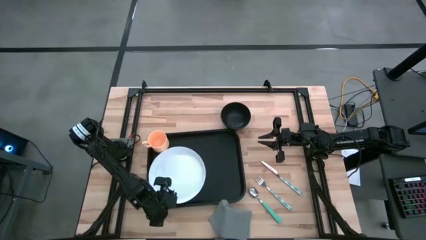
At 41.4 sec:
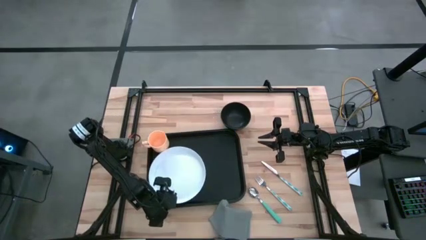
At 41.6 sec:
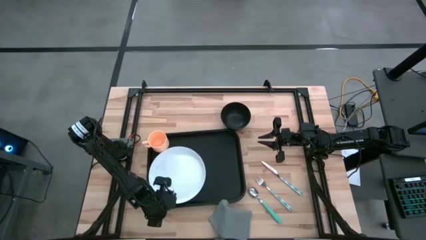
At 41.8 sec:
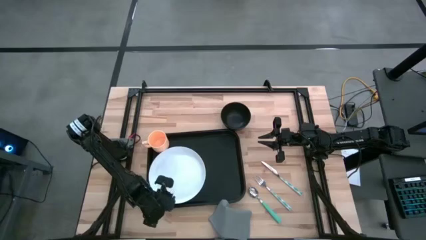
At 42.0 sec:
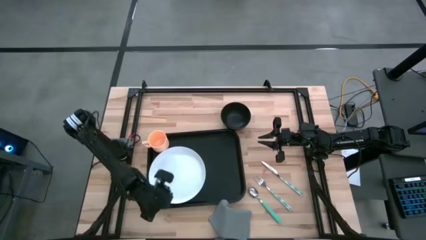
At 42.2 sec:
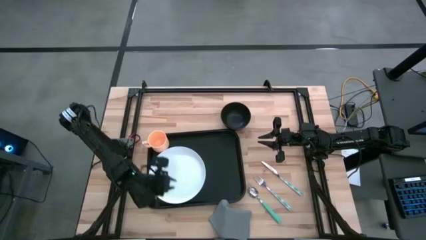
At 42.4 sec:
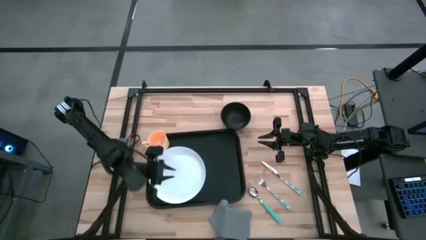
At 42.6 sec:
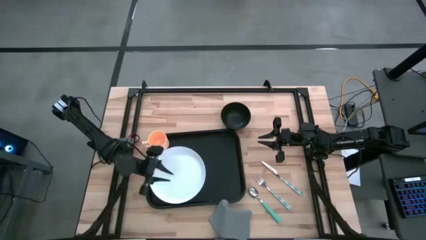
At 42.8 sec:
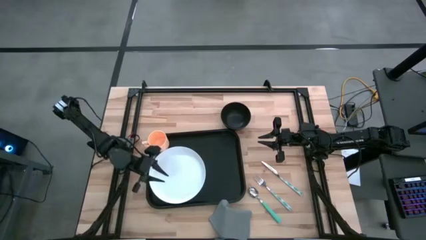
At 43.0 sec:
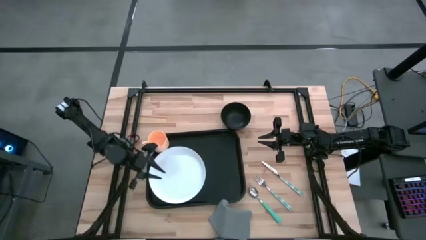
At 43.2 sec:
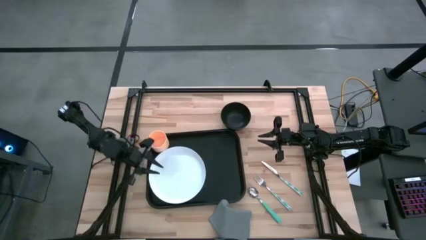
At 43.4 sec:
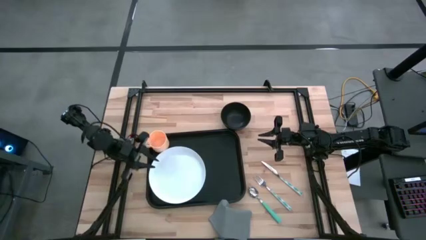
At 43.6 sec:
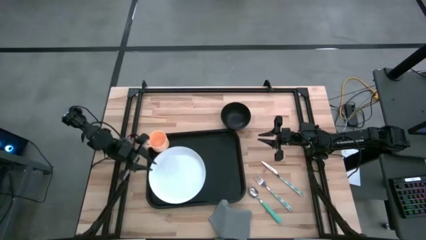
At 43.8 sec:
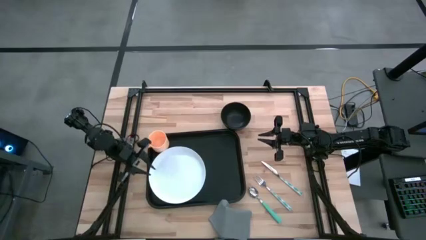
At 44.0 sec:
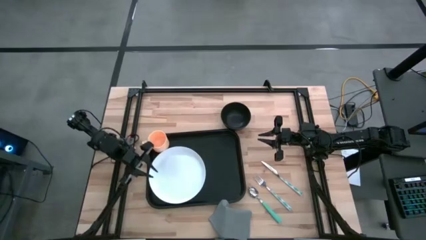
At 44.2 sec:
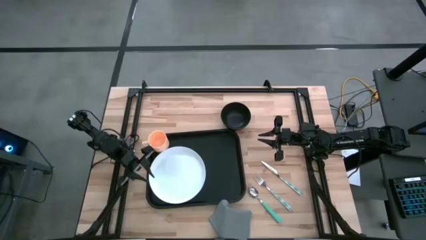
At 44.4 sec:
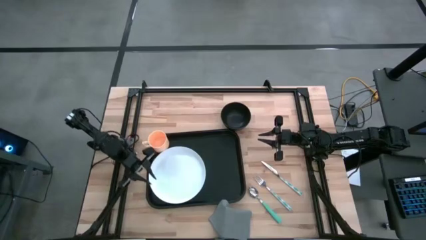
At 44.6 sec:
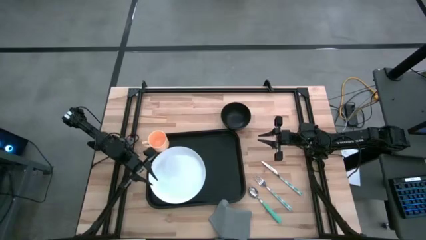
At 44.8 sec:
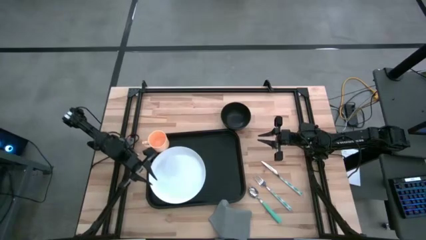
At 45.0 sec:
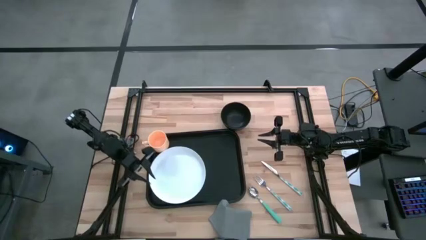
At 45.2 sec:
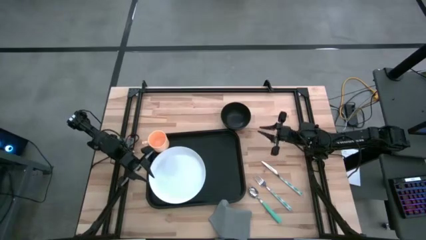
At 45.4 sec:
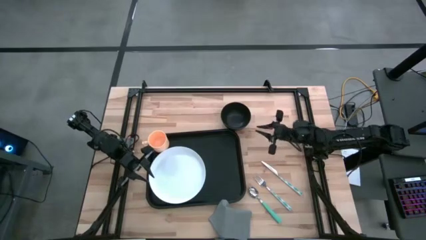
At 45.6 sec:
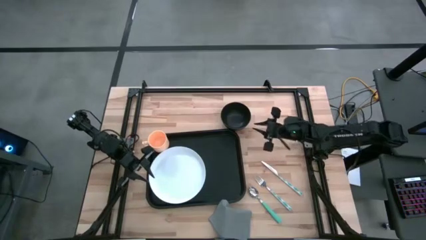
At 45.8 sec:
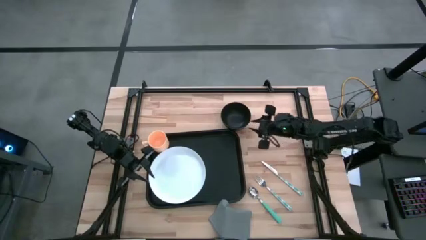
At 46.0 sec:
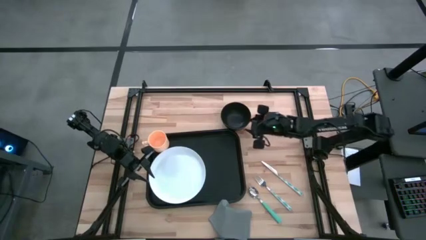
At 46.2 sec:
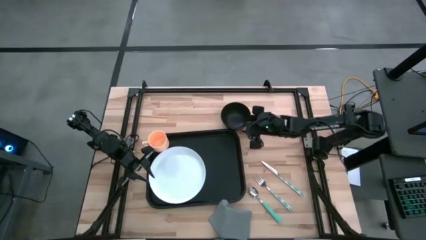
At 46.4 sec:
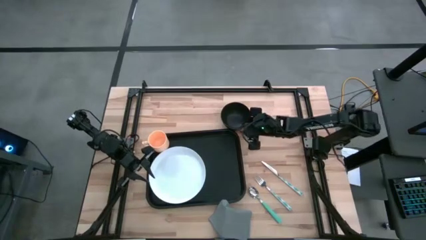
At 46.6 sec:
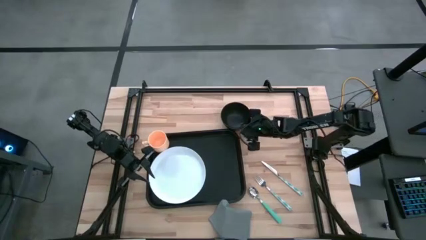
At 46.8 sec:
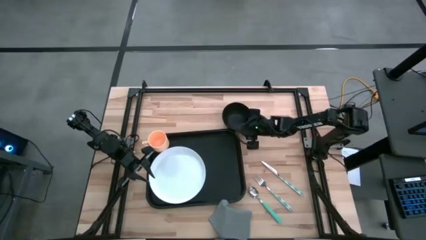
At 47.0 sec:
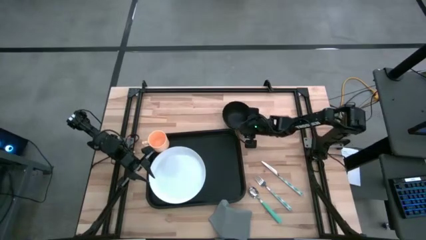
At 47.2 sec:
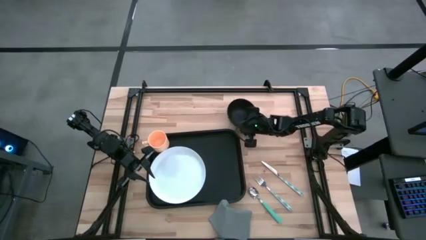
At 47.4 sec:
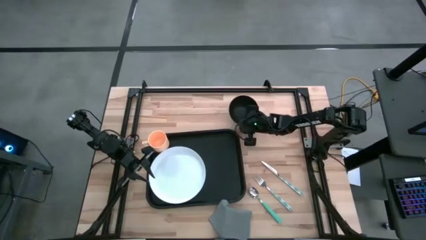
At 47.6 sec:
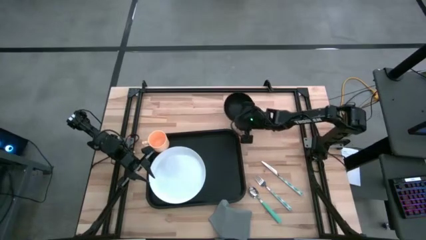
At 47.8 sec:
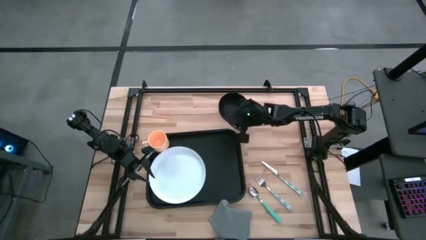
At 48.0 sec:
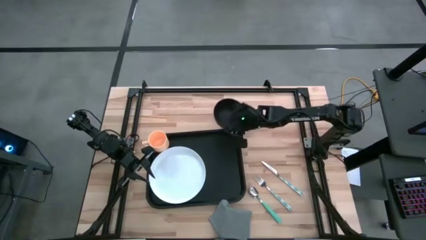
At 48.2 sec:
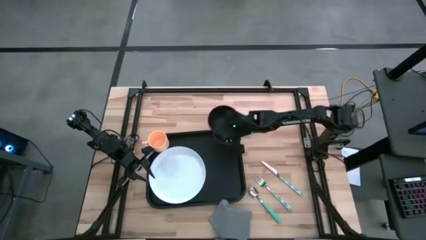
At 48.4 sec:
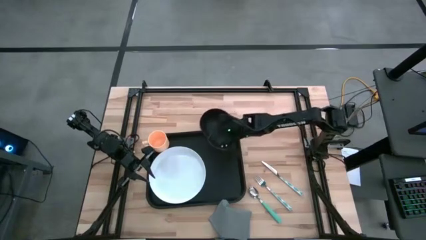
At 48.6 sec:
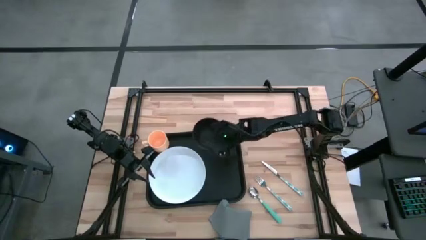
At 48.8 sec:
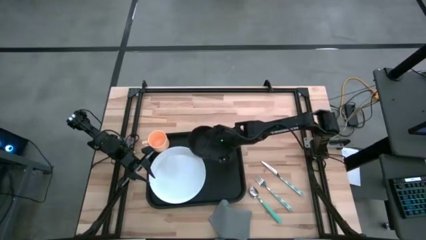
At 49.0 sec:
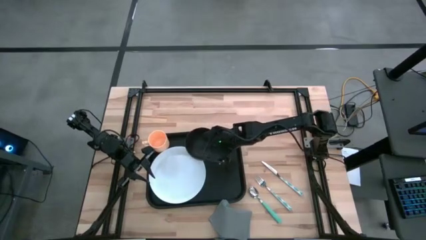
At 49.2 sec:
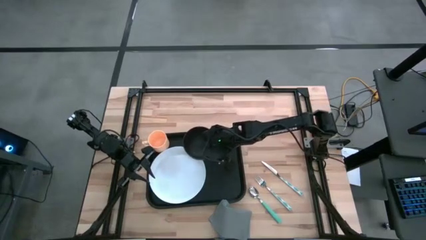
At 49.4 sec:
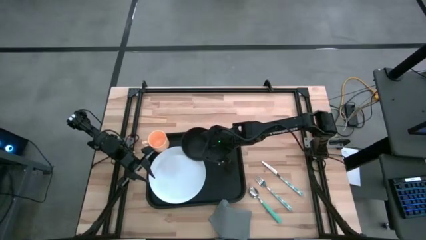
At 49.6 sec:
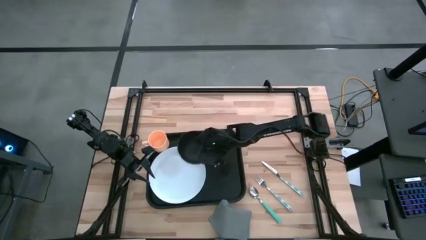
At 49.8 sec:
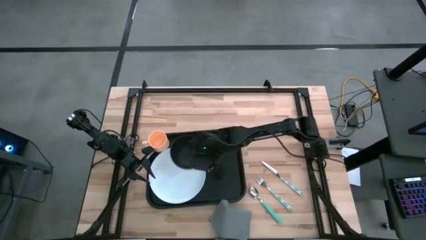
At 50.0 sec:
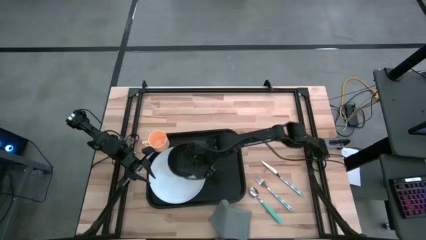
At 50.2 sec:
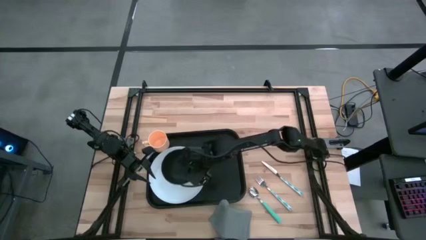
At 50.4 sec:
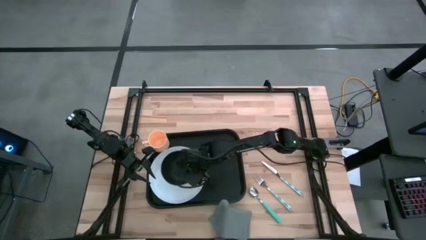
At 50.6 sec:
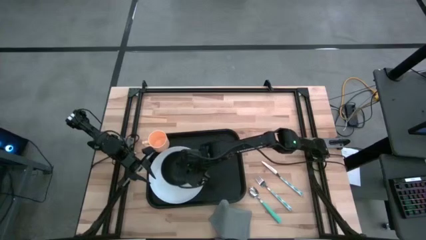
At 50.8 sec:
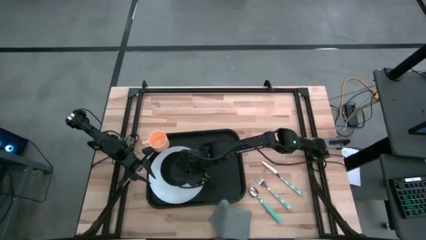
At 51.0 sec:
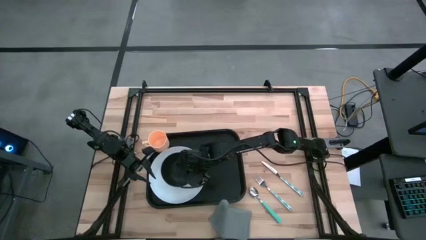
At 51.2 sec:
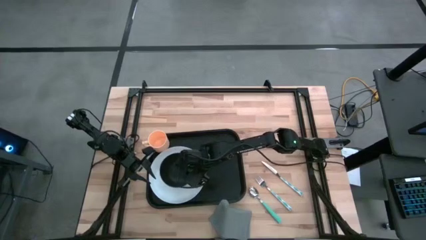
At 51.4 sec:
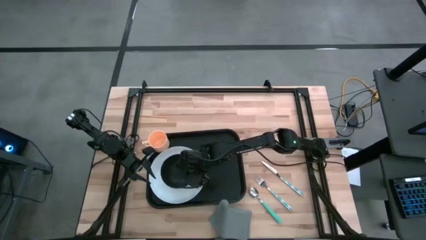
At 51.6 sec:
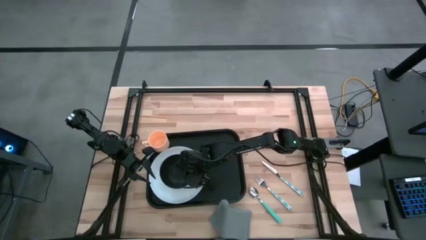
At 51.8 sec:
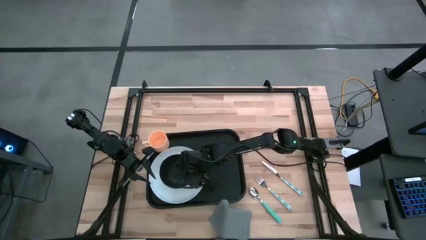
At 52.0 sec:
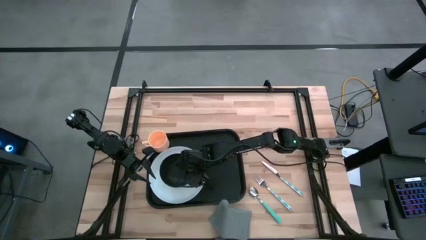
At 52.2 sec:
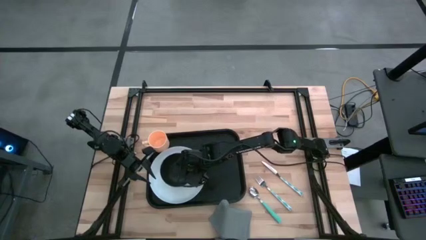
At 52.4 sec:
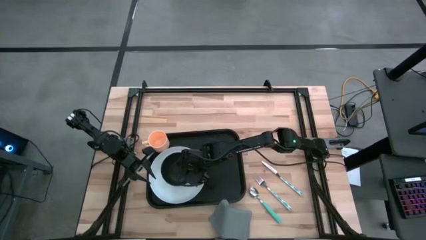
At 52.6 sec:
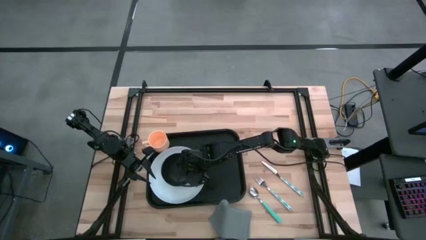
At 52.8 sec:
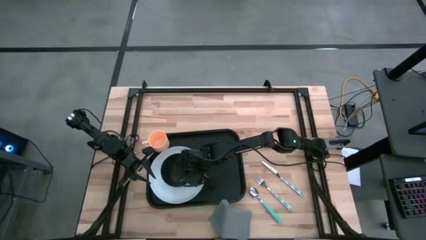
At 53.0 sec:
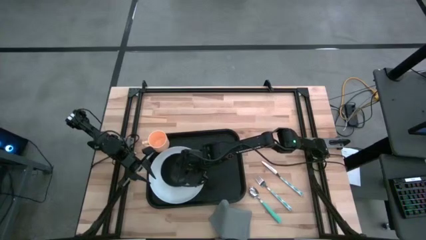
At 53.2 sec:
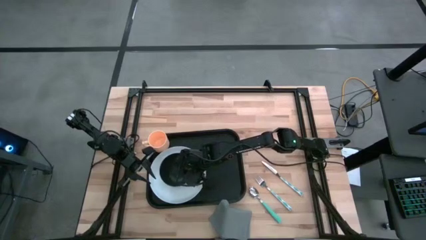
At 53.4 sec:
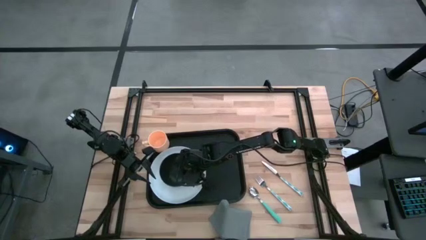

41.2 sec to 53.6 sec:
Task: Set up tray
Put the black bowl on the white plate
